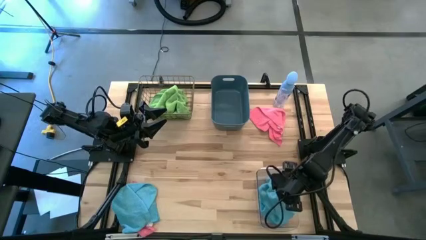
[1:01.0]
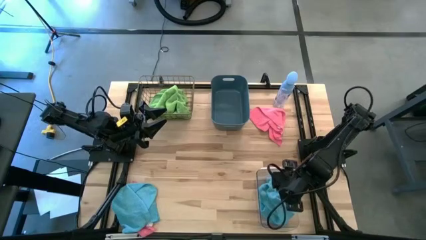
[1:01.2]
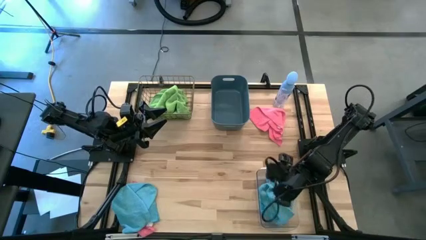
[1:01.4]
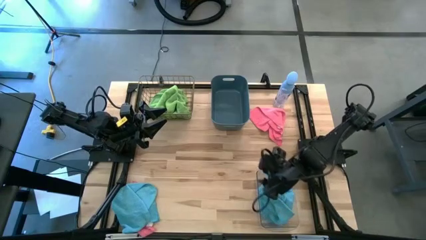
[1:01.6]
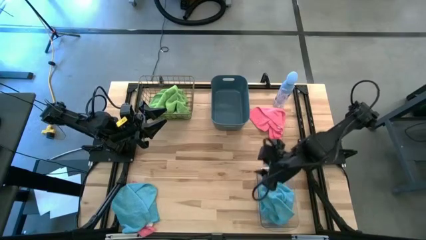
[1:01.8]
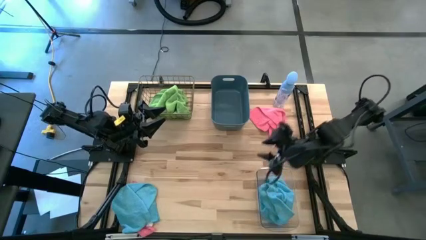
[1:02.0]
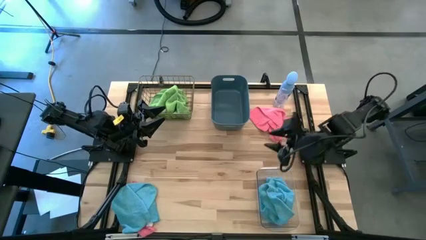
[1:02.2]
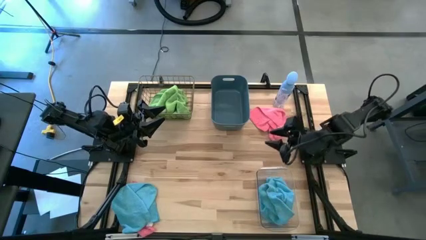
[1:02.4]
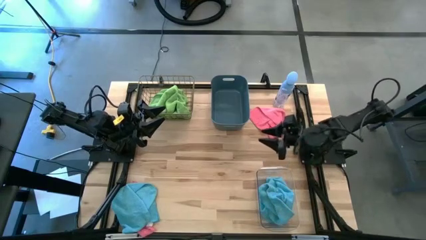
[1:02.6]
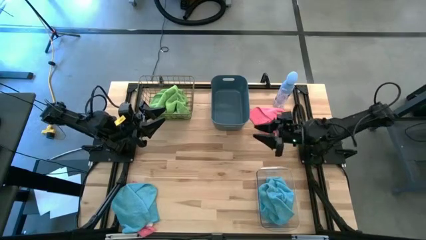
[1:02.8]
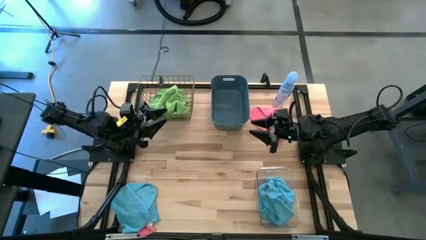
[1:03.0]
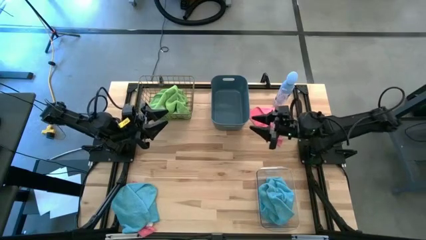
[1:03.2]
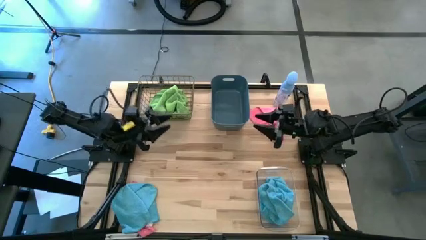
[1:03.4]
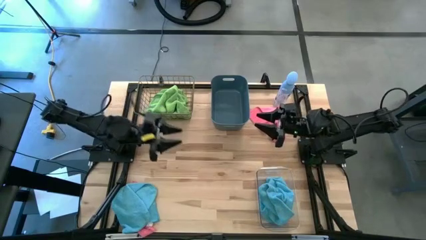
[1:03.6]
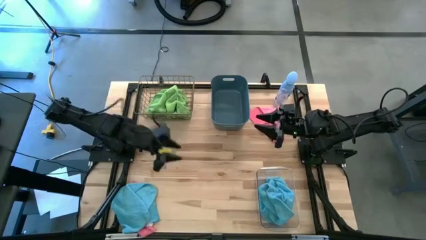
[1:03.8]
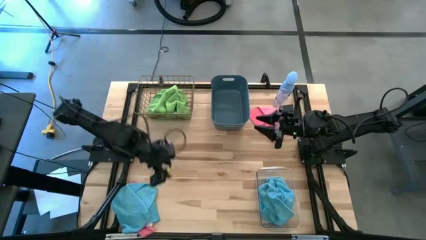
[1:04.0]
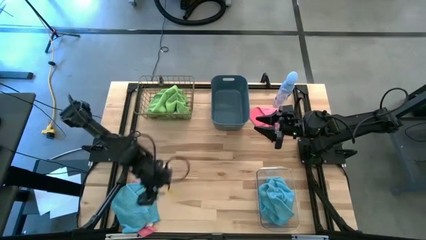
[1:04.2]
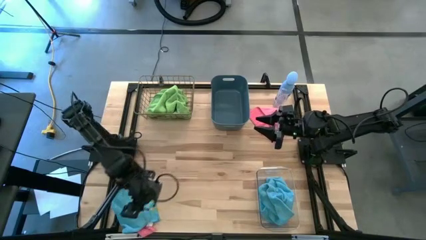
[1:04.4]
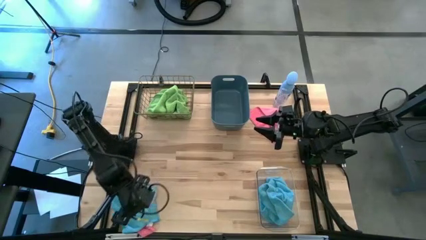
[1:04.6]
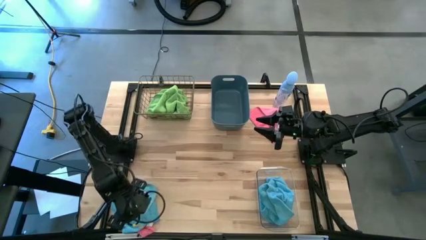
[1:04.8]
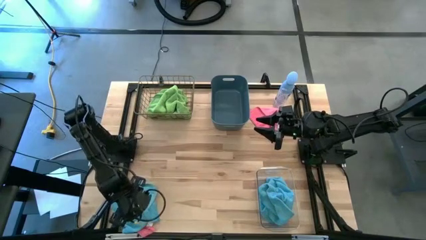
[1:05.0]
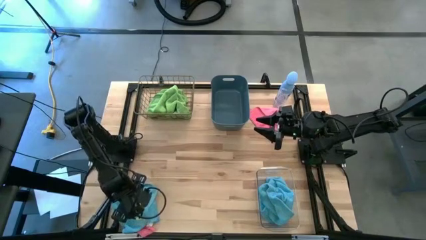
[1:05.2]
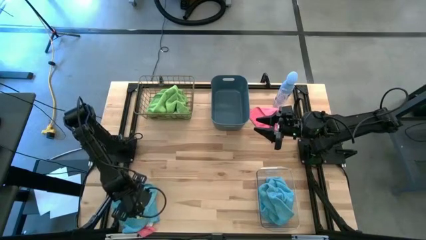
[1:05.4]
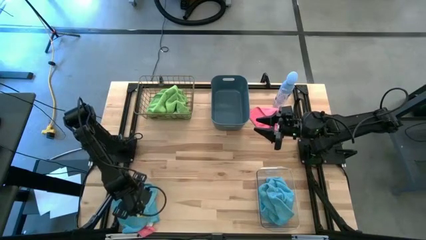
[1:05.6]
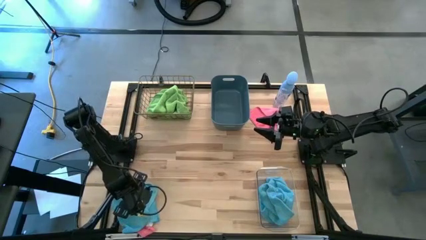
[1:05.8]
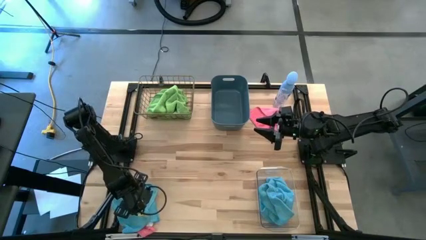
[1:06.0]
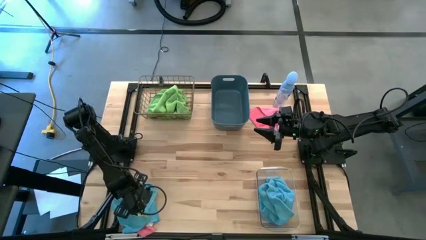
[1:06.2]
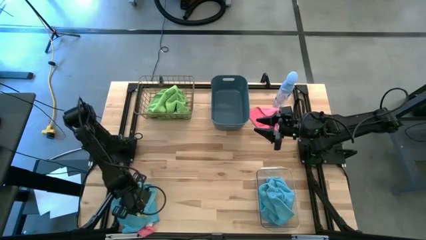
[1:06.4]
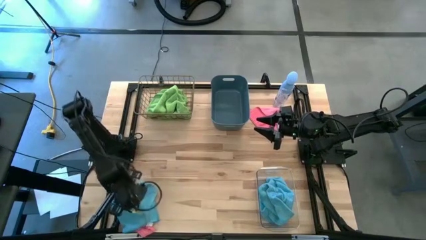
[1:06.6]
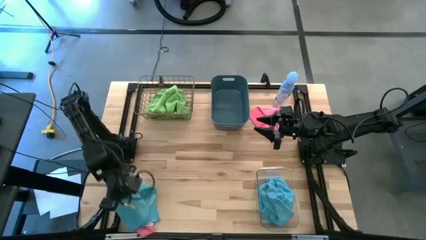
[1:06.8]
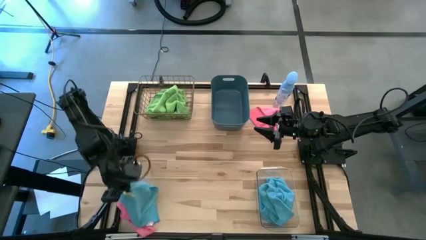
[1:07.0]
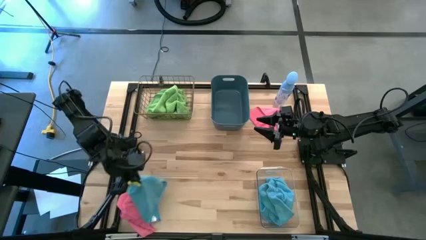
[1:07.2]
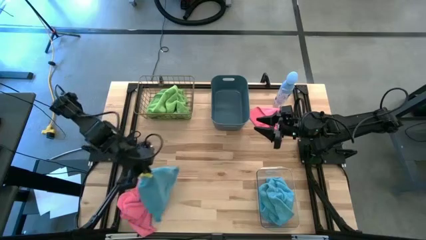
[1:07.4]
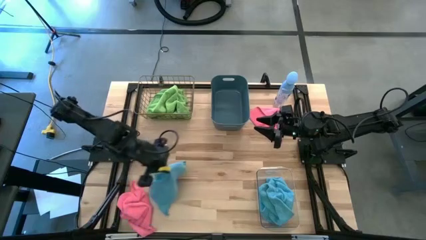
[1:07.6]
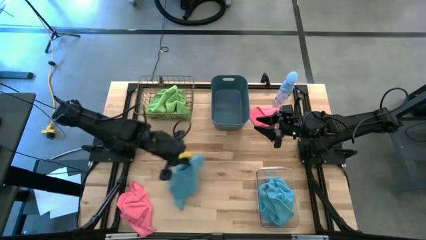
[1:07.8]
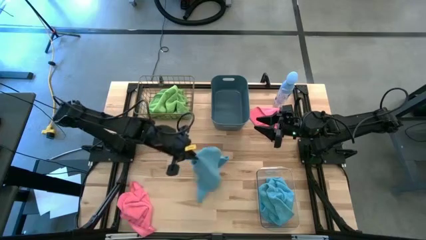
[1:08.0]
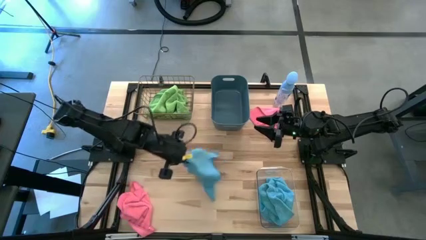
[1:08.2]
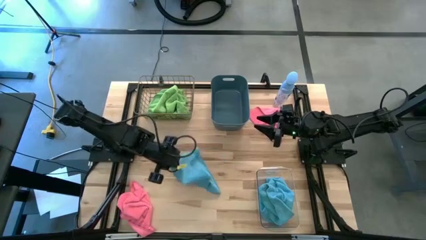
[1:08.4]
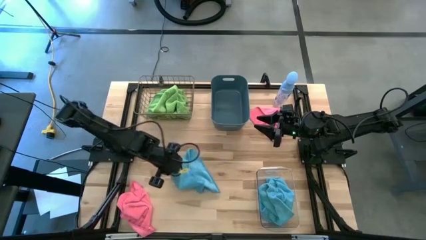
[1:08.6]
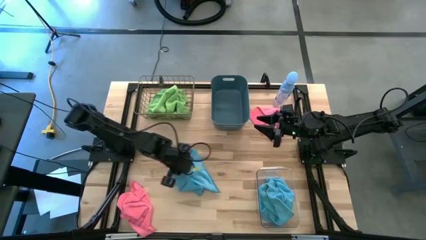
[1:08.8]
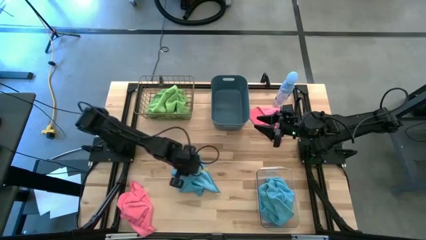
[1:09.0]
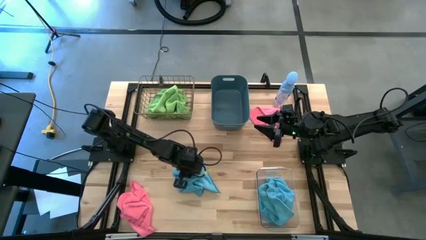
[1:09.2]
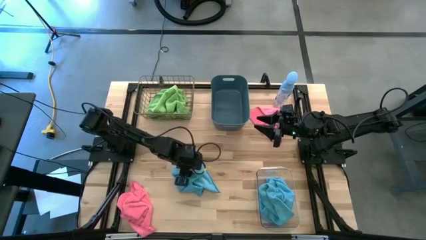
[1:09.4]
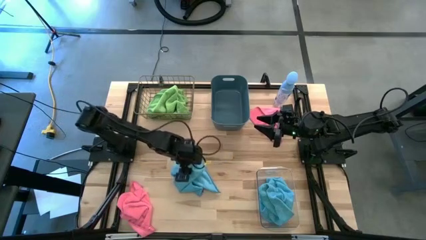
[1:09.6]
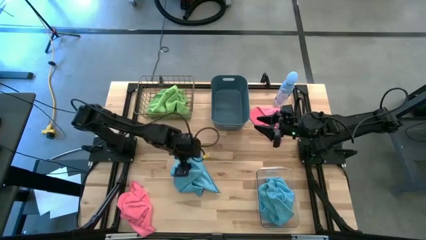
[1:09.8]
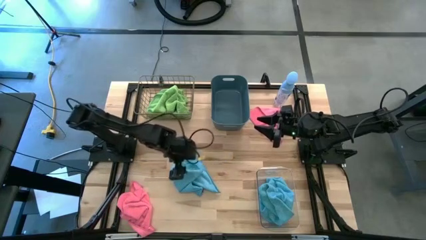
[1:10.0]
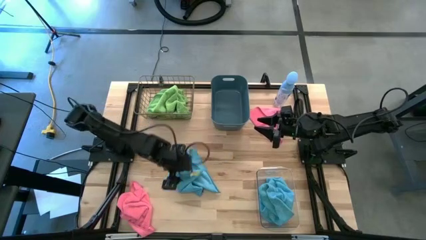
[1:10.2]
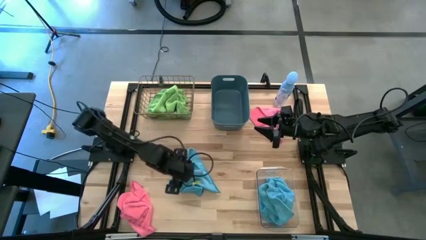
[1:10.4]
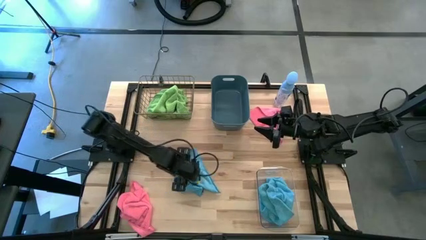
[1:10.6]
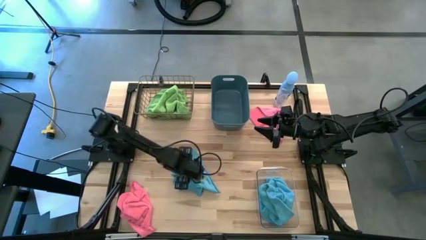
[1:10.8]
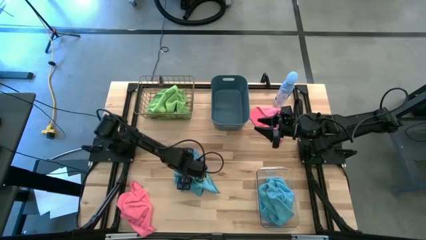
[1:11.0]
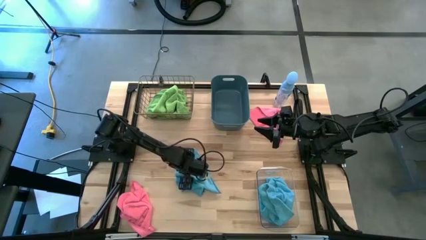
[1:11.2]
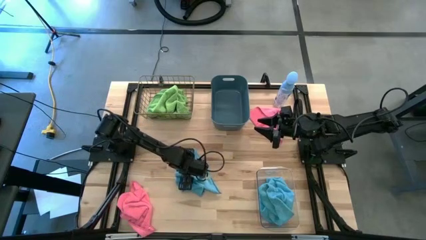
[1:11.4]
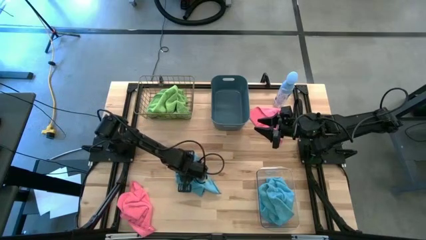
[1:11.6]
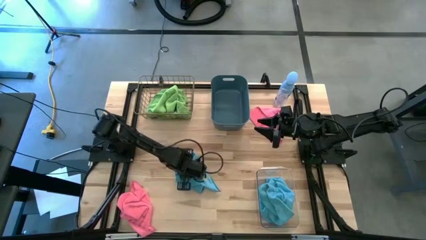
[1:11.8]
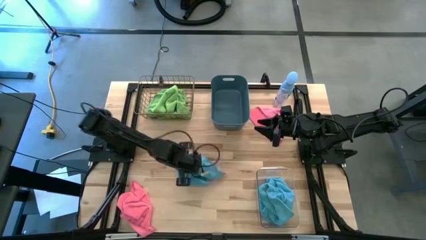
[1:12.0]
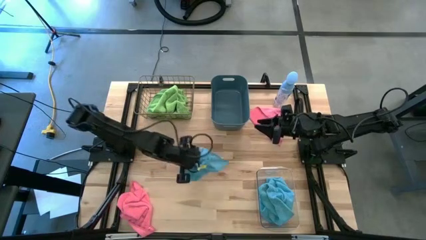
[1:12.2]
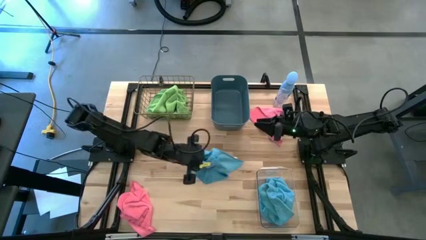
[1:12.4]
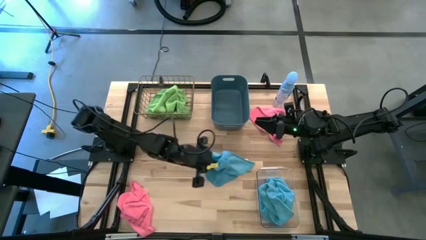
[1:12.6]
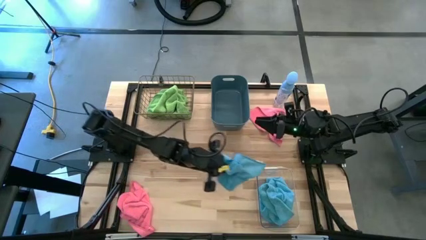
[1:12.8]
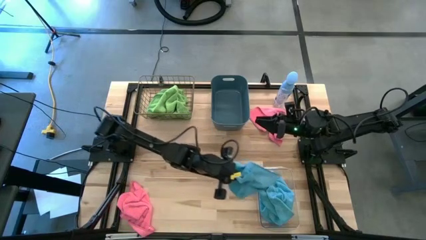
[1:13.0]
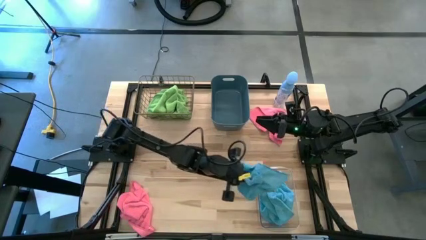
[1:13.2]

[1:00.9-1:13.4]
Task: Sort microfiber towel by color & place in baskets
Put the blue towel into the transparent bin

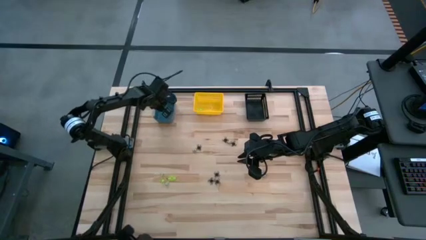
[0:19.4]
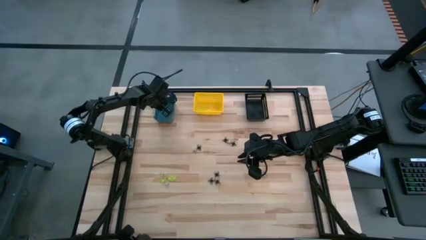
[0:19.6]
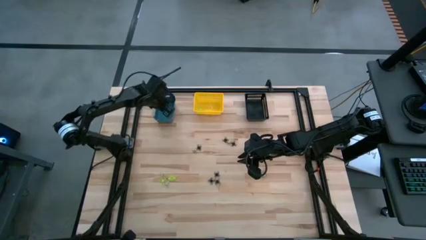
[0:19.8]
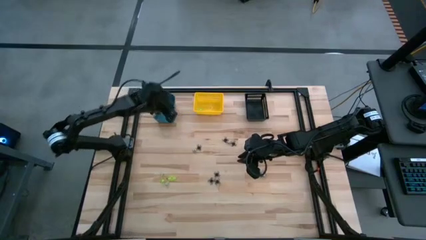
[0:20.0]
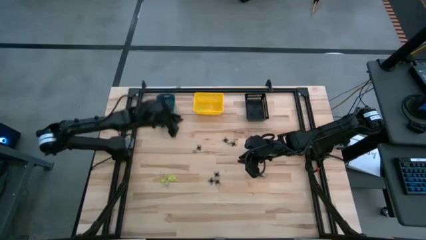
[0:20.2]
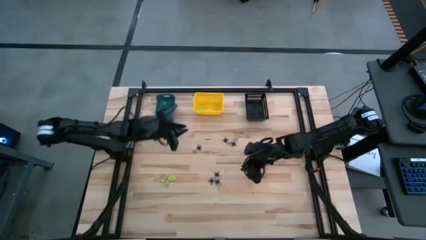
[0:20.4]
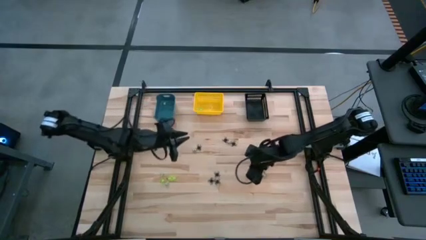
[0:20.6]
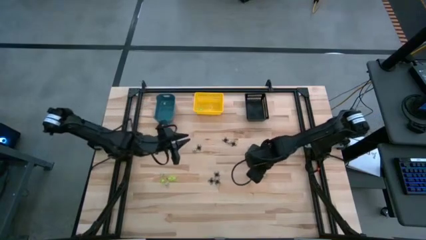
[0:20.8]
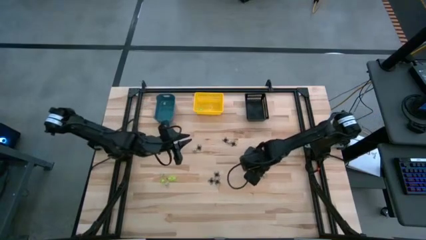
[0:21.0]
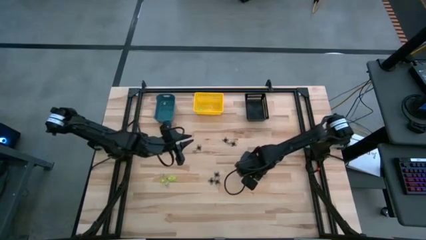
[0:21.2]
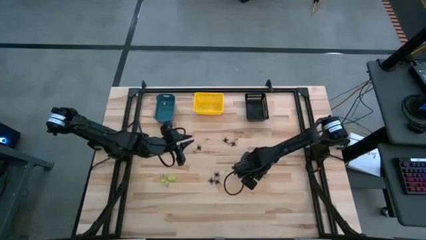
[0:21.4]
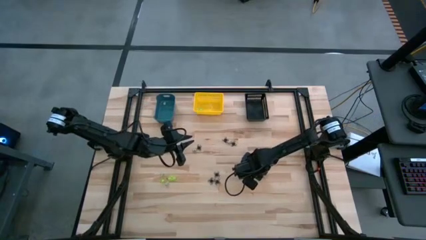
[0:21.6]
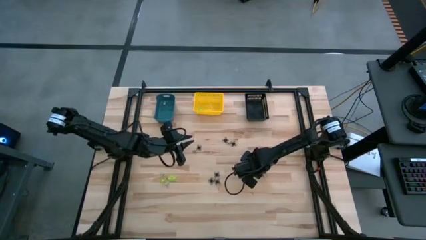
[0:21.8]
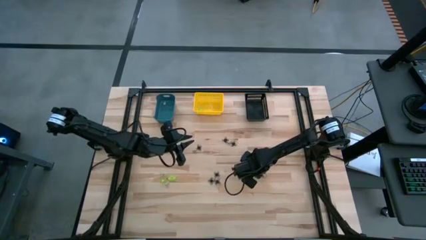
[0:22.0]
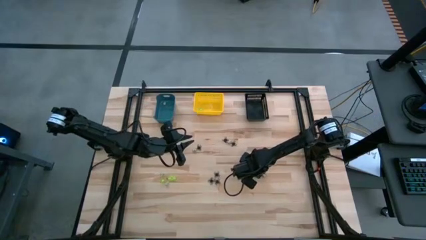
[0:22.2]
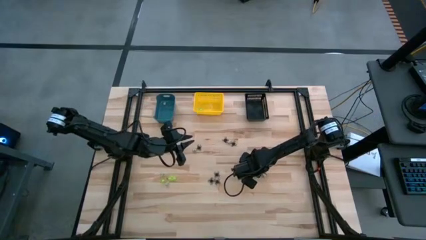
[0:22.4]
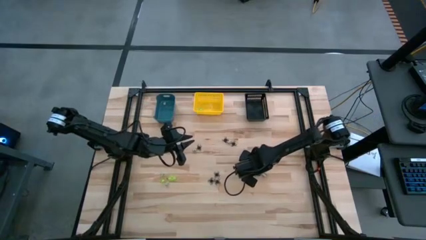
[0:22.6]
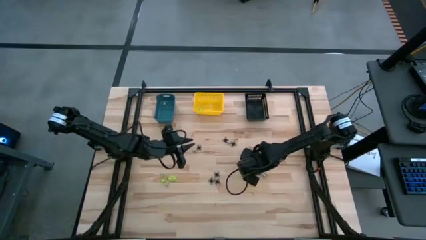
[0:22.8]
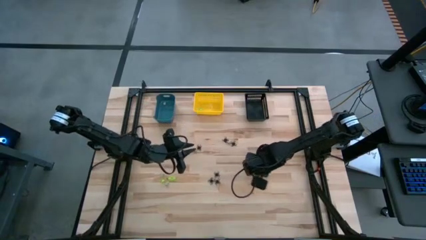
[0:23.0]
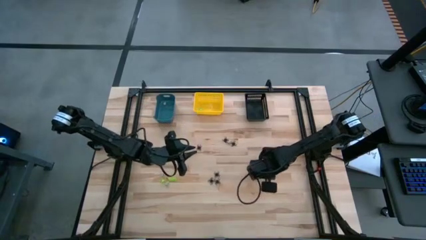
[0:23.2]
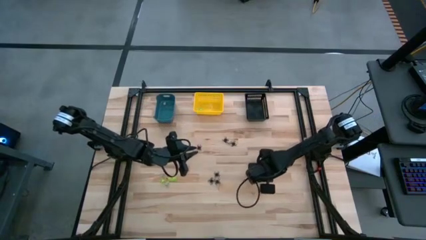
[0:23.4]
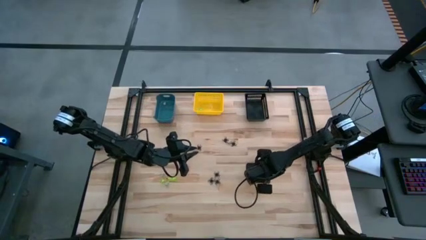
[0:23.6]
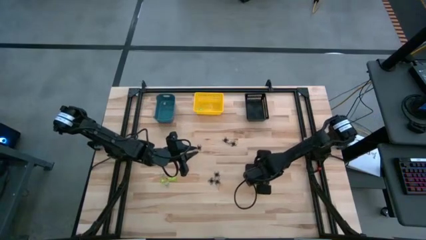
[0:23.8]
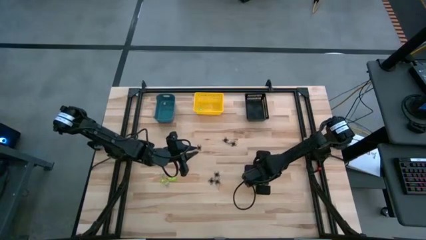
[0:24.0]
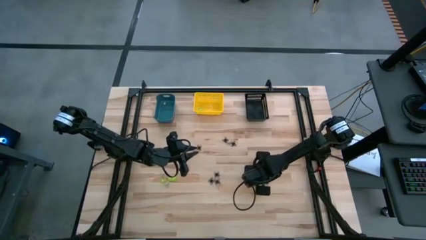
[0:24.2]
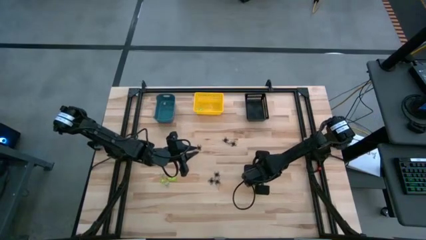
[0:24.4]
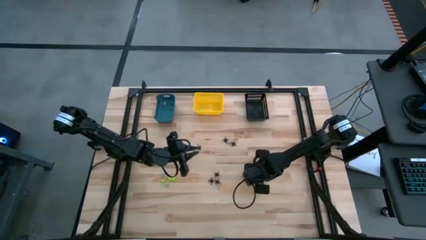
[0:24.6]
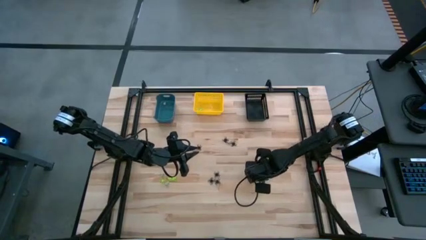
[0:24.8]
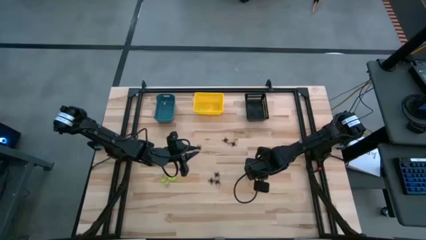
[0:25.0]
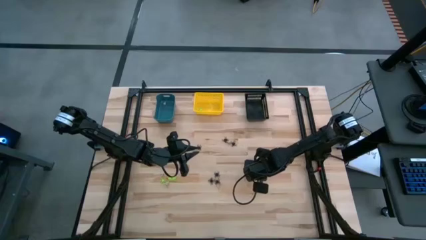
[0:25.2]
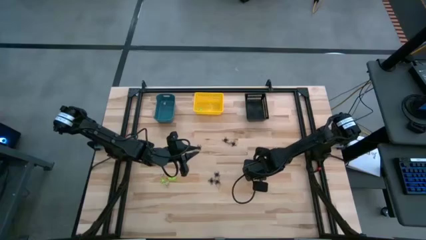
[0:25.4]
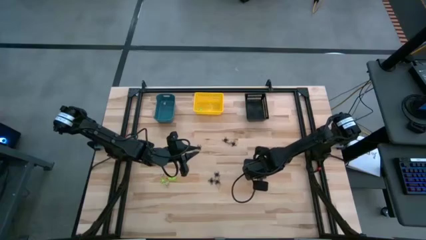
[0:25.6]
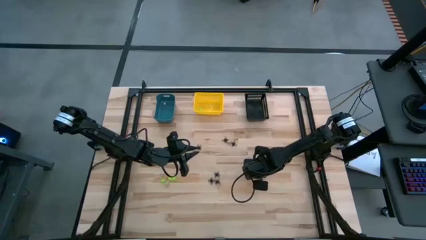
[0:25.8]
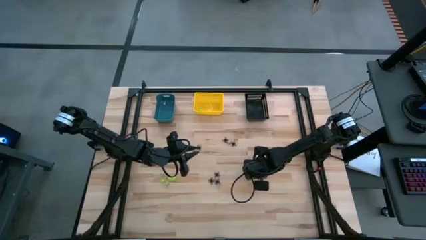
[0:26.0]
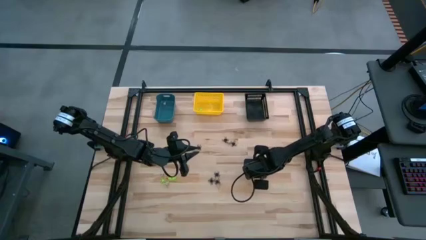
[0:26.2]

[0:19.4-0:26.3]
Task: Sort Halloween decoration
Put the black spider toy into the black bin
